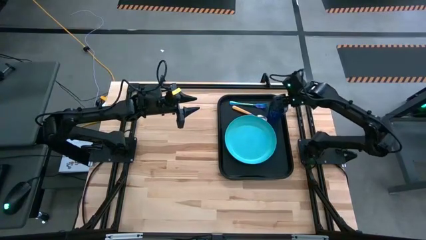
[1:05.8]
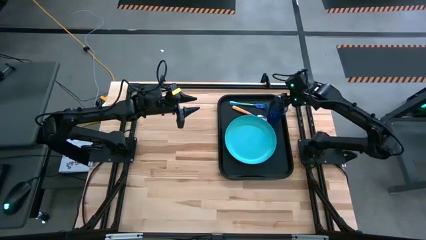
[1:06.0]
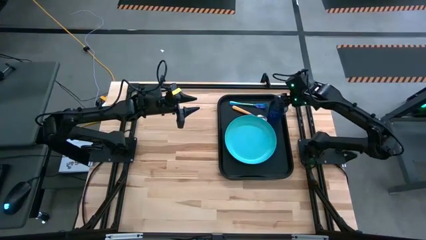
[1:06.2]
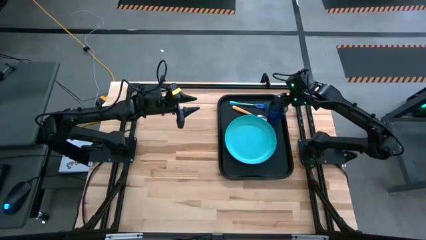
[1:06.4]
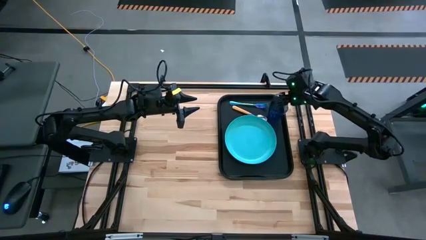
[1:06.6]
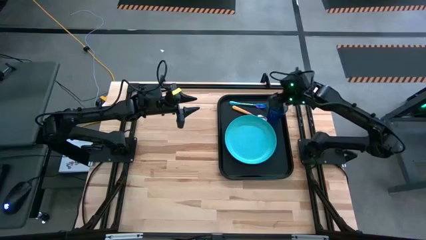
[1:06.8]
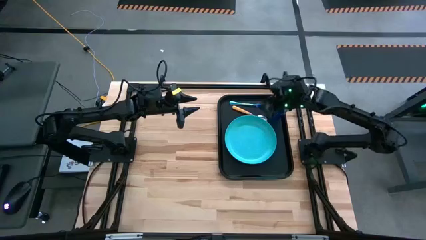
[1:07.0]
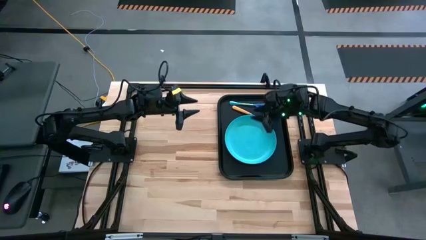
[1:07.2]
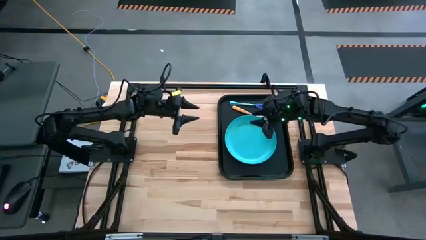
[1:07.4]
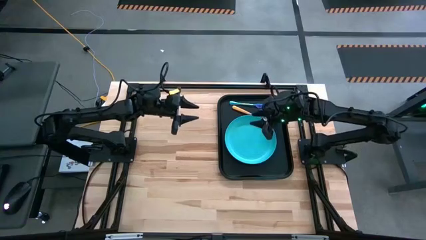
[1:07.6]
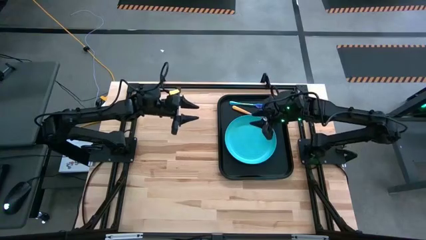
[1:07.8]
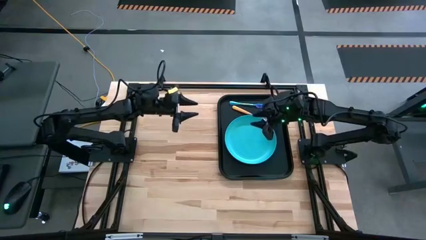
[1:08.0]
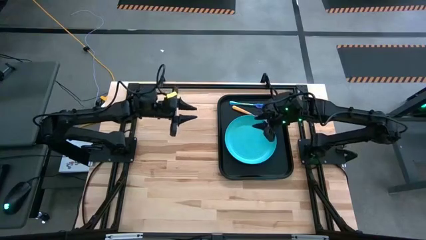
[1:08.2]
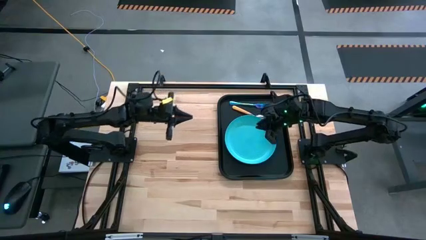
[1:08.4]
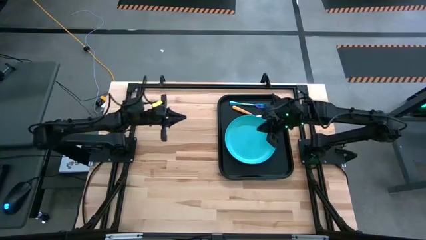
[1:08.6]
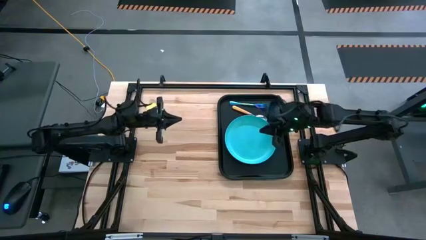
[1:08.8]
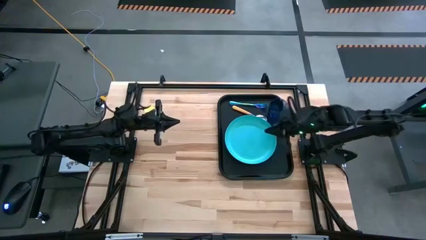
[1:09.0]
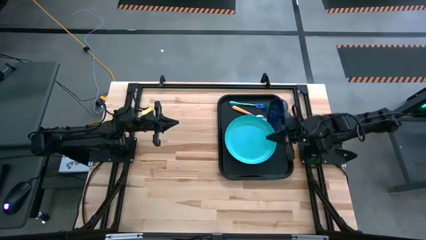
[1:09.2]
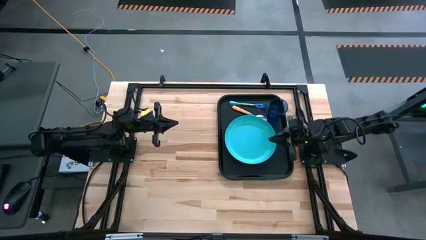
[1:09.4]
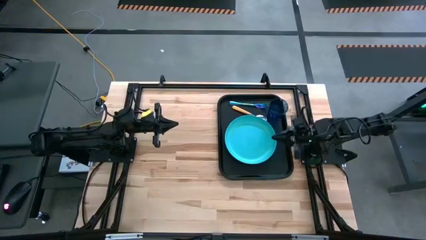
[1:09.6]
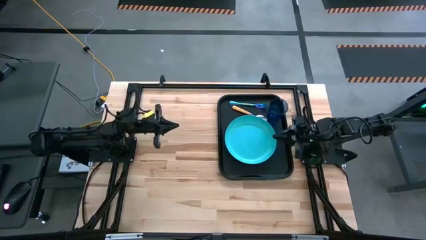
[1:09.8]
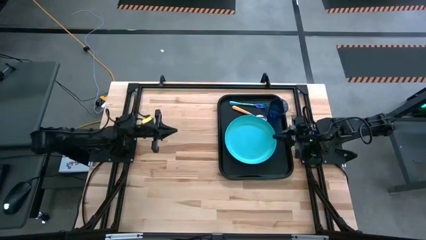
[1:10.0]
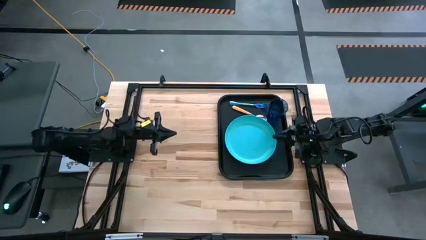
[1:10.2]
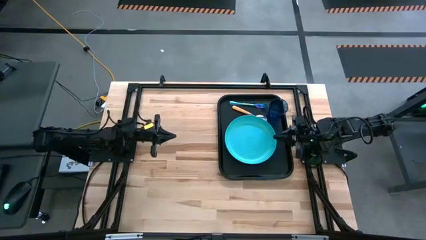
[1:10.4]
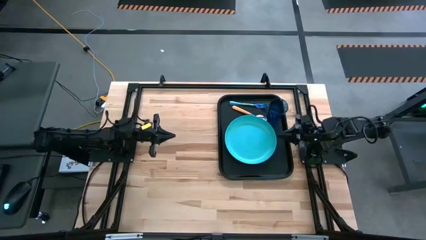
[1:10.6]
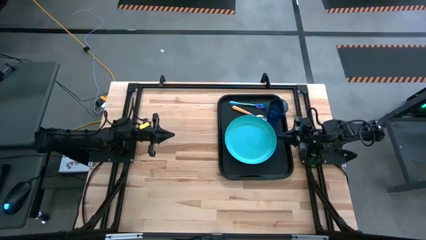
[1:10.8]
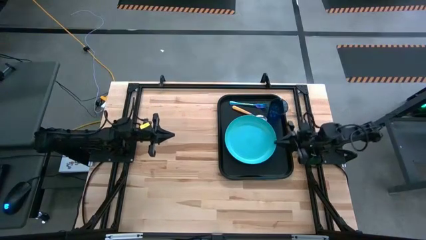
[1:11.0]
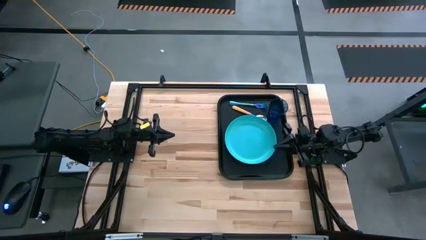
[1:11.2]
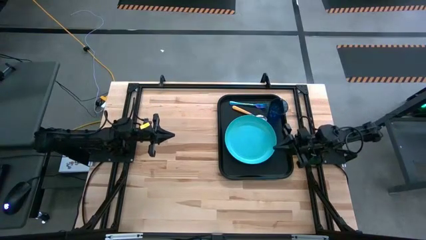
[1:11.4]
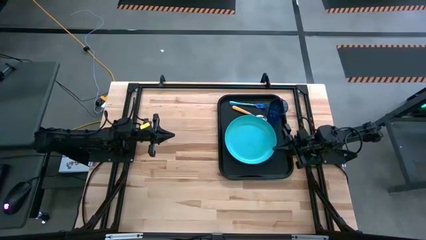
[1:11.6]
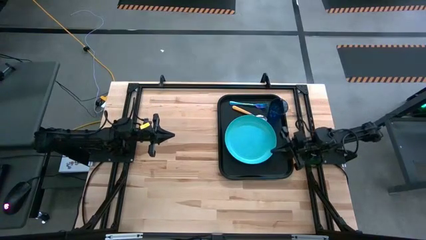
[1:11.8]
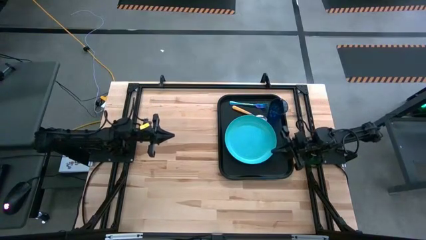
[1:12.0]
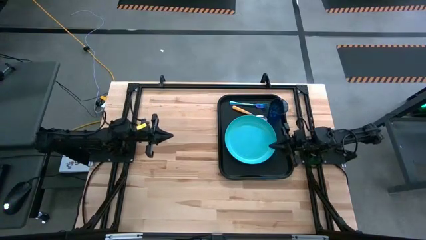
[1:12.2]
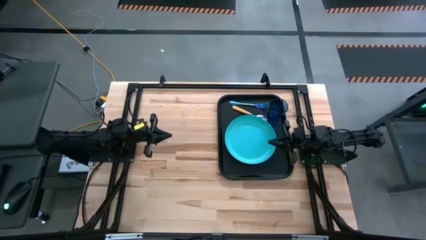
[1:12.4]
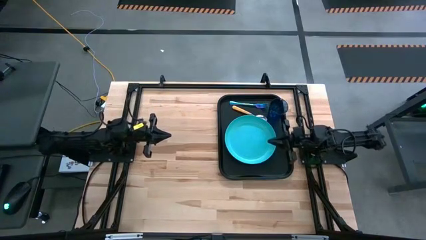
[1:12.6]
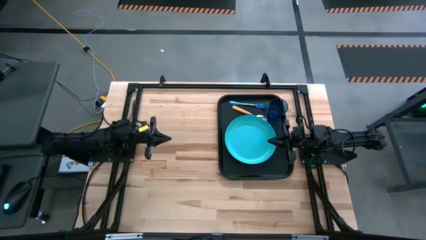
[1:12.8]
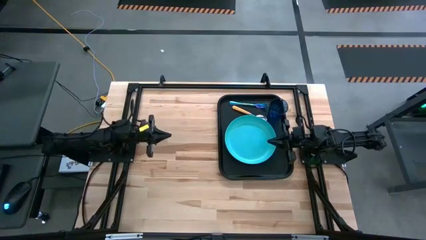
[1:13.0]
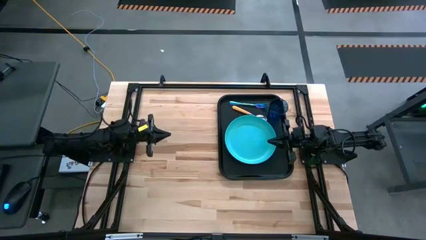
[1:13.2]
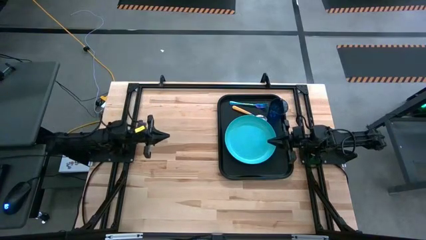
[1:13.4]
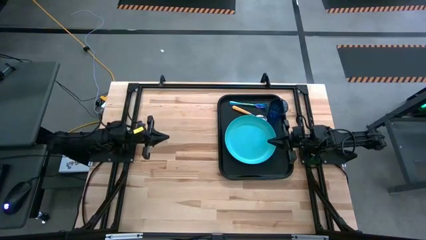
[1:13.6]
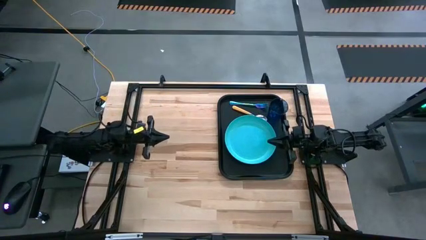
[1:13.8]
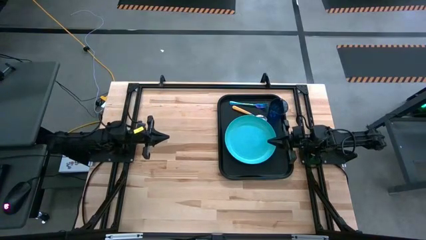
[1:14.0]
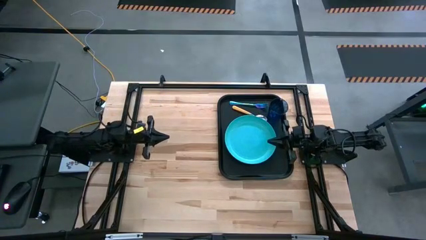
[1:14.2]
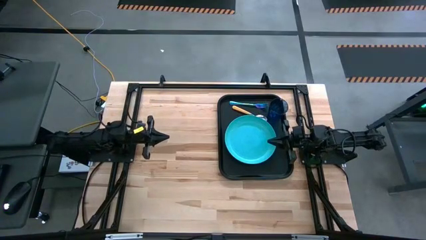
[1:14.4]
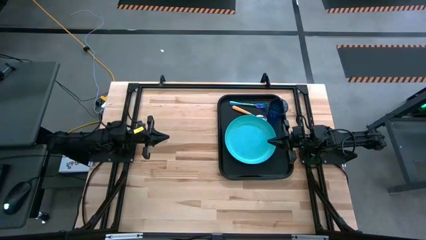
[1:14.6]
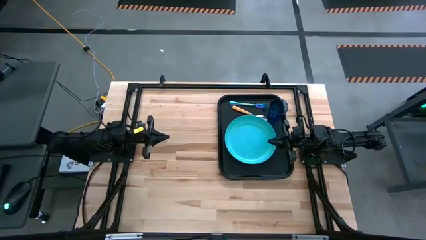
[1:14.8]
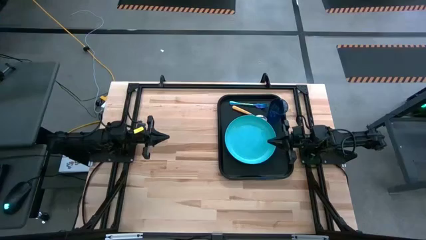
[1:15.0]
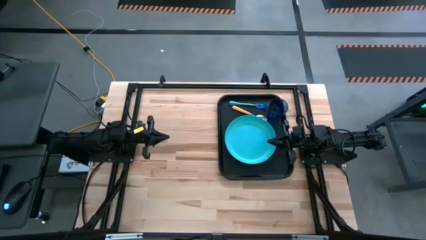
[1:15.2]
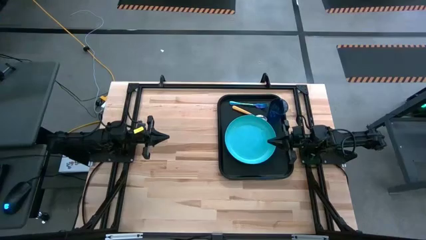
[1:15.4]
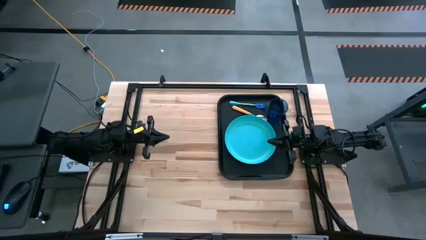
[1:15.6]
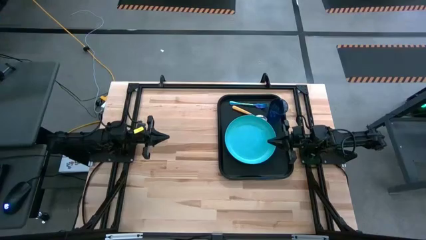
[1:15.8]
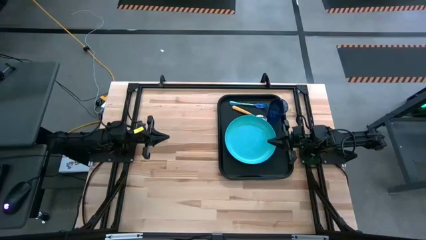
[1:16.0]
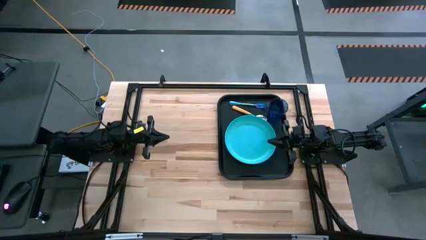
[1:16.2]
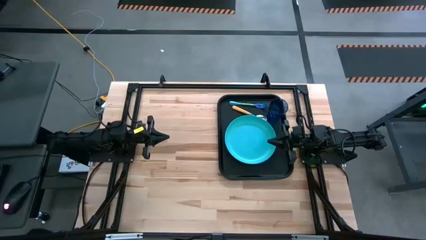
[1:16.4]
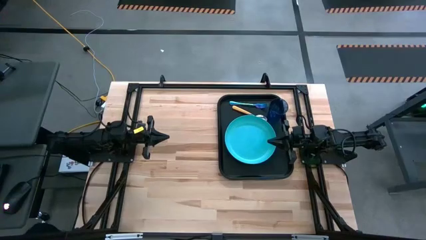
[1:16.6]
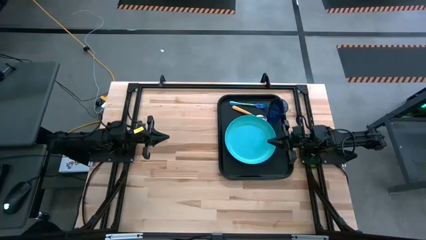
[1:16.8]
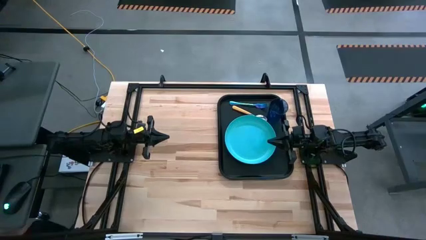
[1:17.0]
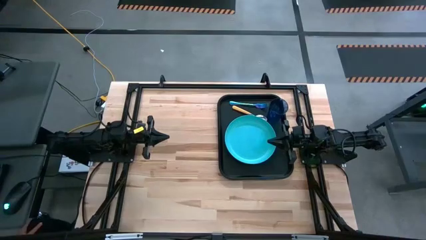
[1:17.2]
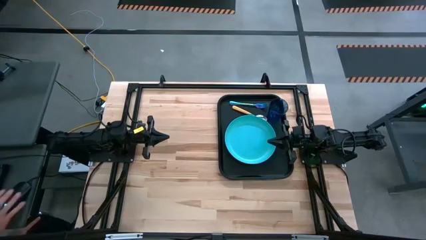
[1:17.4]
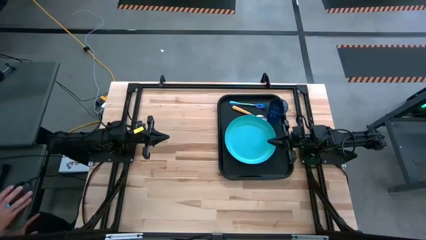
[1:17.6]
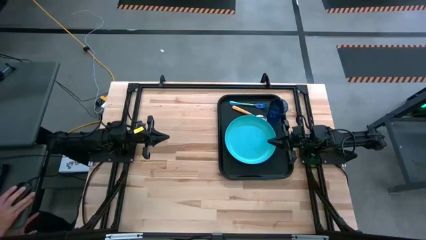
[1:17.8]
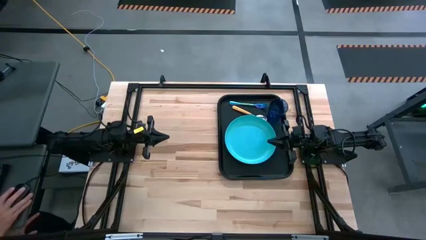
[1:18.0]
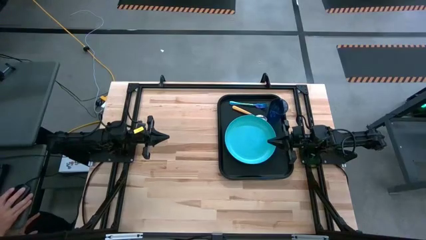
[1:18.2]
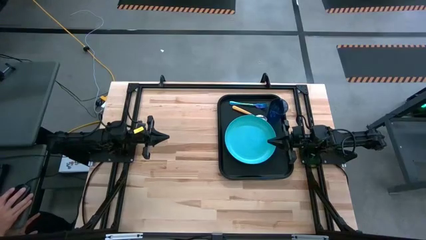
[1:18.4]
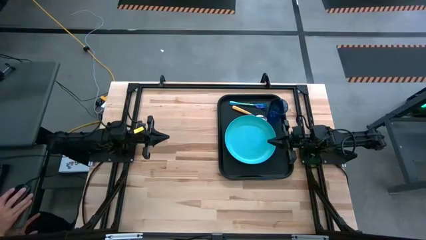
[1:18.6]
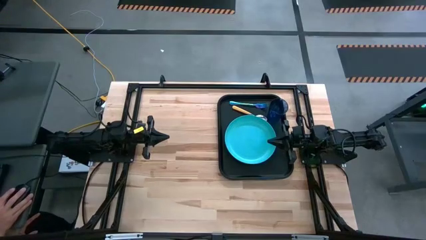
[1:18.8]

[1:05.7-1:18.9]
Task: Pick and place plate/cup/fork/spoon on tray
Return to Home Position

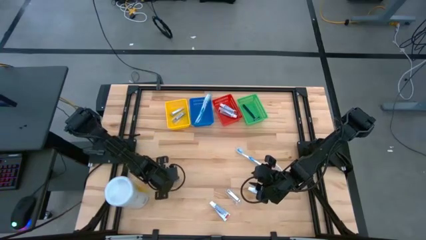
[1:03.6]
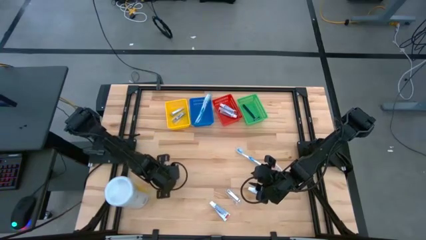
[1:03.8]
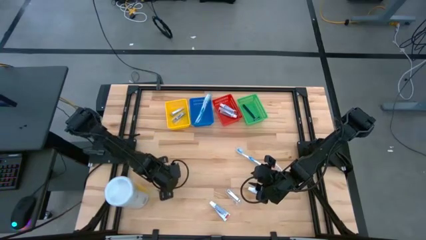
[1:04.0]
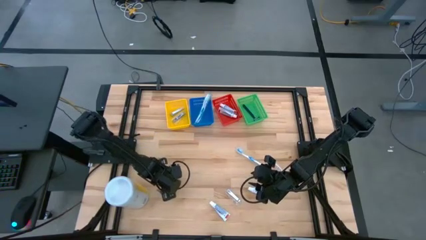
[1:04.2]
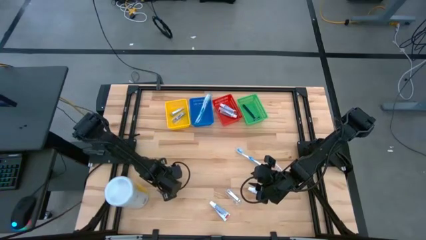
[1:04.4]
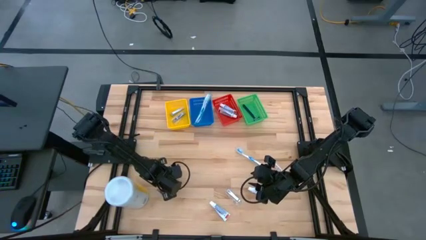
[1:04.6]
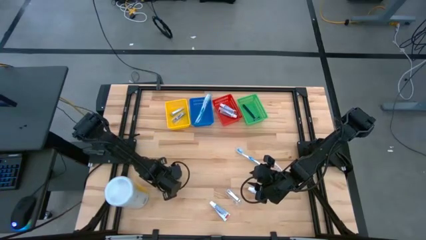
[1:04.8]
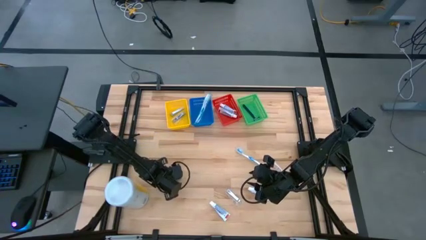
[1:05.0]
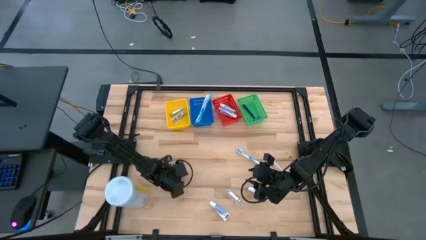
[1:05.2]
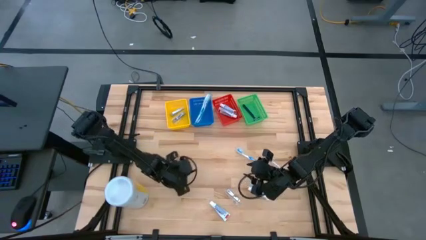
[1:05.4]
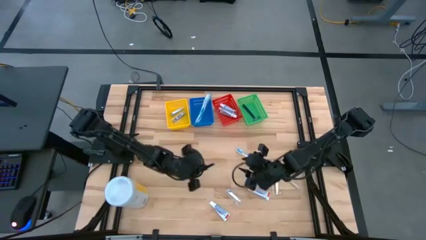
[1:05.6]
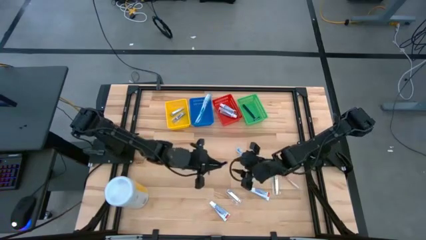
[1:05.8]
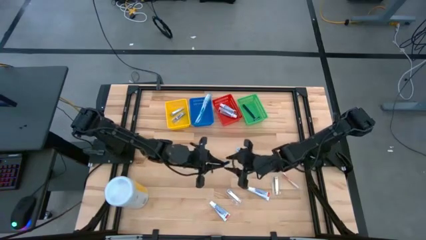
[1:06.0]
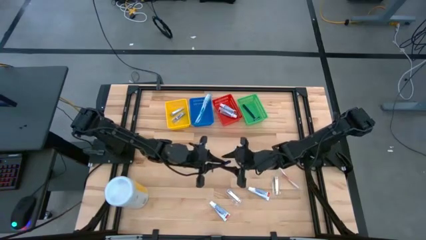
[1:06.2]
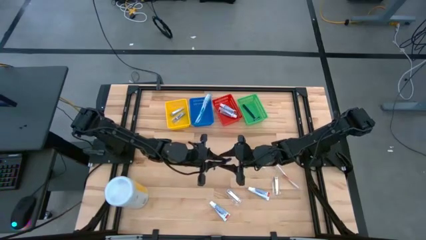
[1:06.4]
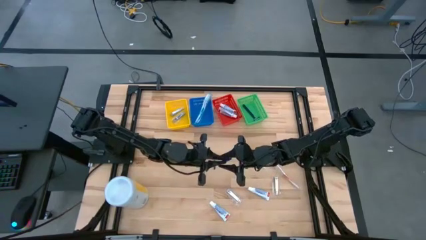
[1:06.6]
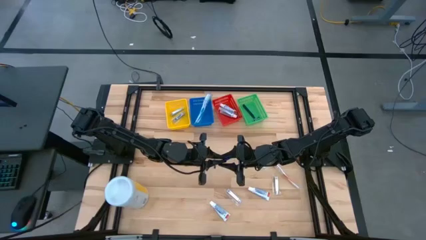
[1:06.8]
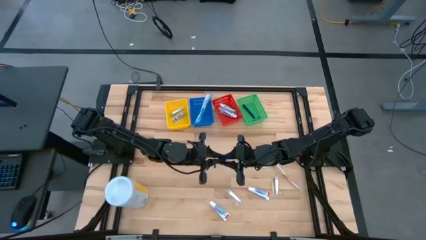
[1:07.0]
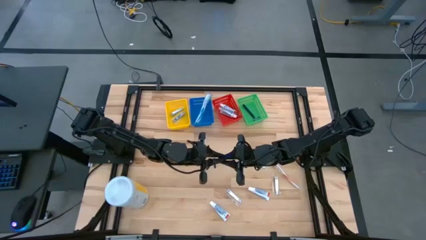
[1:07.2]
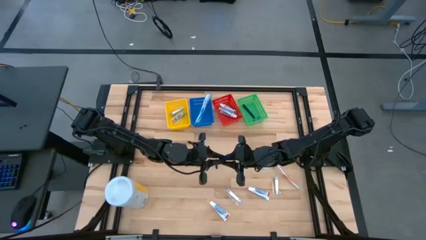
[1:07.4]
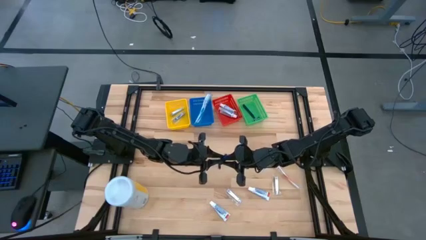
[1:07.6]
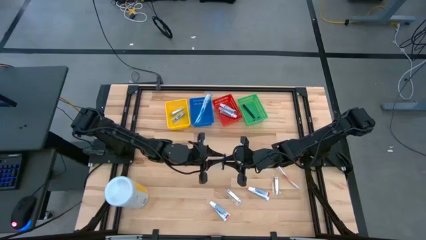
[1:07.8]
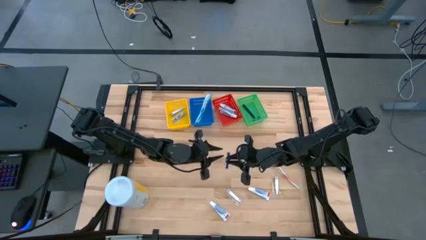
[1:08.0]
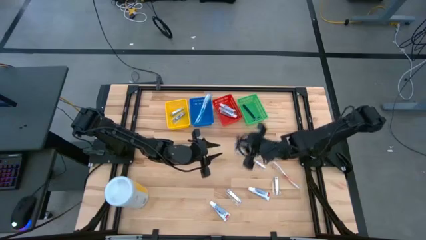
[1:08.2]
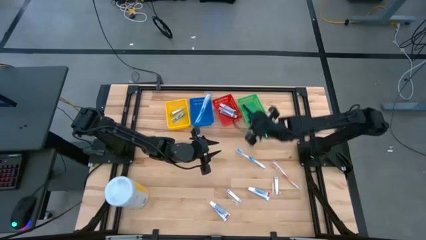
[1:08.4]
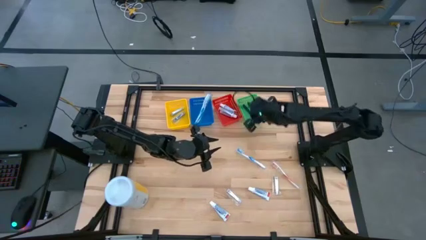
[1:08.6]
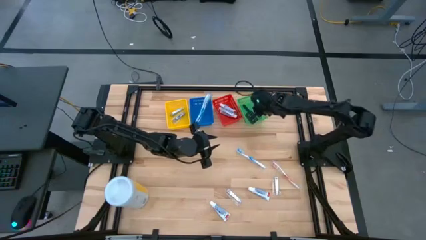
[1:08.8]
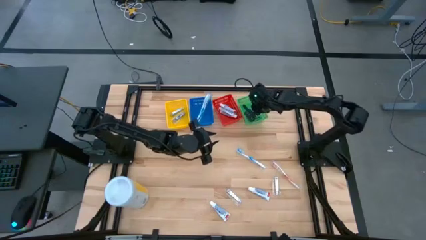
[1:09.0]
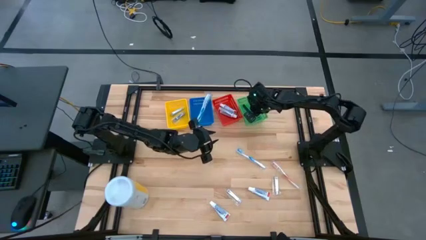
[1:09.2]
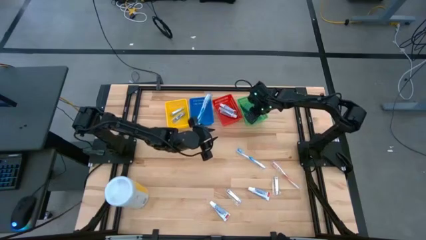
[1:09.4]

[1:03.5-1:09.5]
Task: Pick & Place Travel size toiletries
Put the razor blade into the green bin
